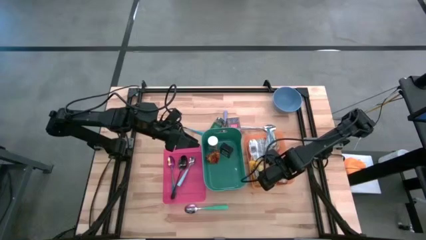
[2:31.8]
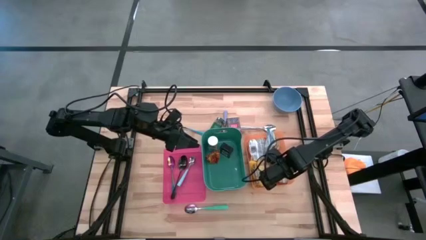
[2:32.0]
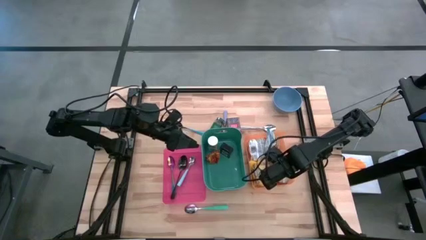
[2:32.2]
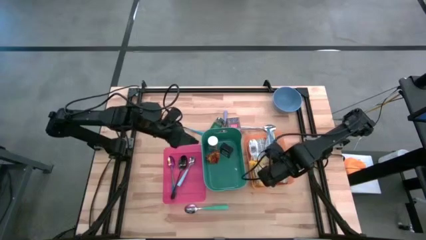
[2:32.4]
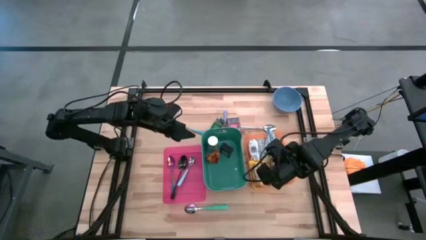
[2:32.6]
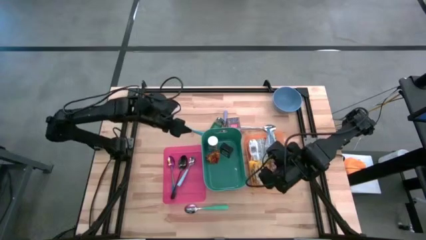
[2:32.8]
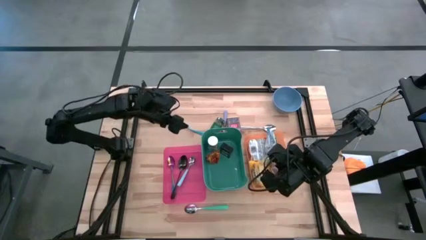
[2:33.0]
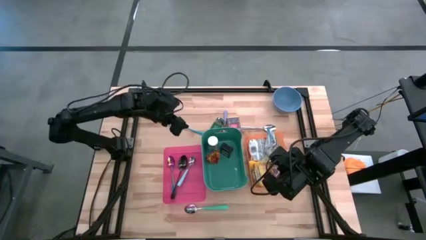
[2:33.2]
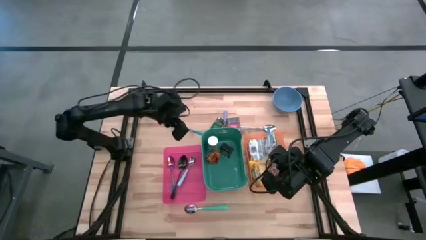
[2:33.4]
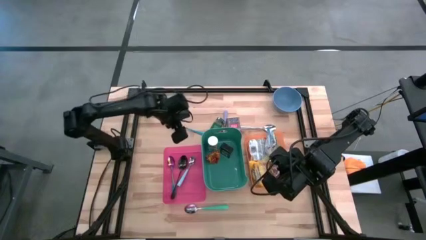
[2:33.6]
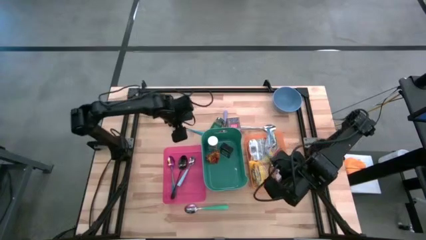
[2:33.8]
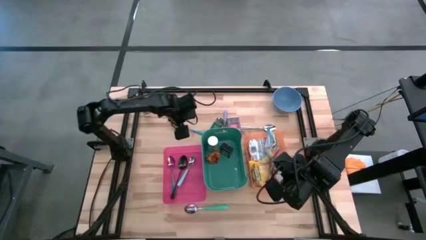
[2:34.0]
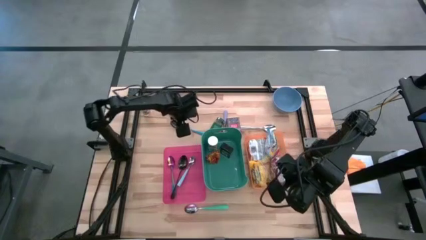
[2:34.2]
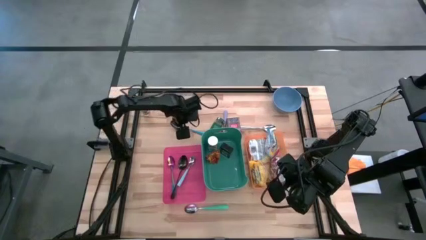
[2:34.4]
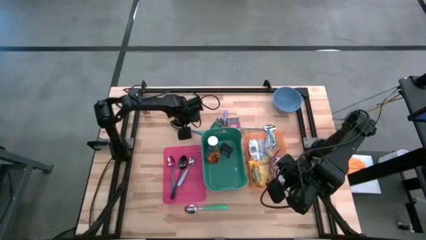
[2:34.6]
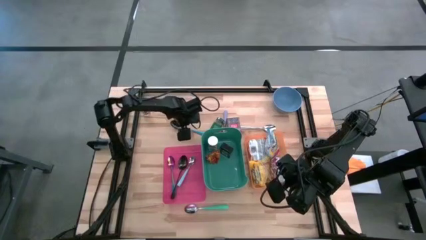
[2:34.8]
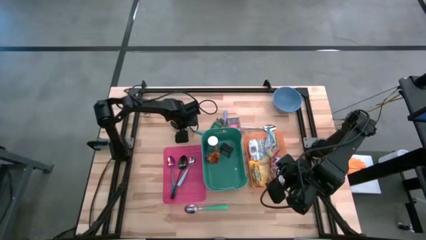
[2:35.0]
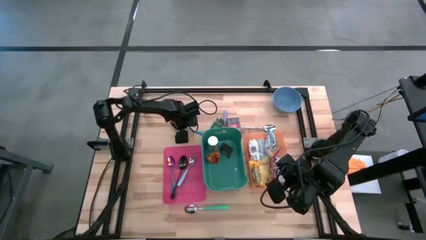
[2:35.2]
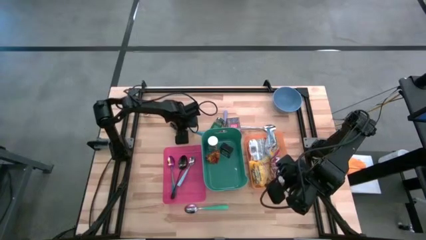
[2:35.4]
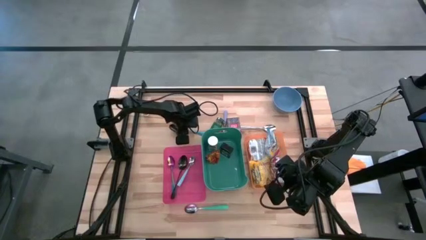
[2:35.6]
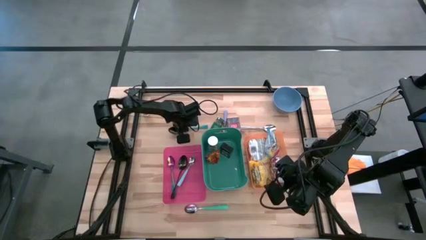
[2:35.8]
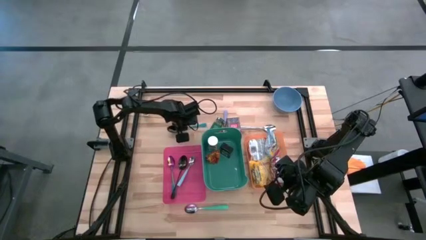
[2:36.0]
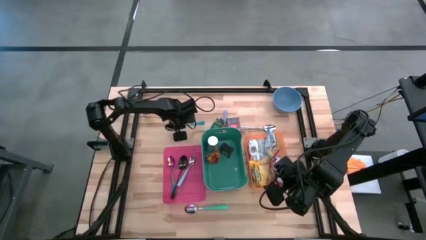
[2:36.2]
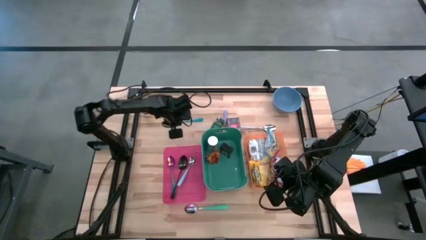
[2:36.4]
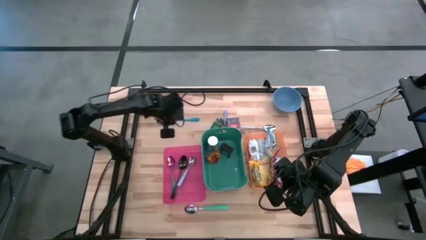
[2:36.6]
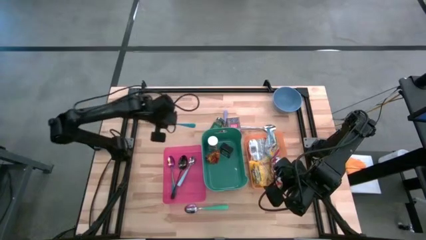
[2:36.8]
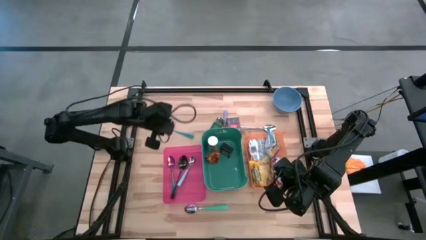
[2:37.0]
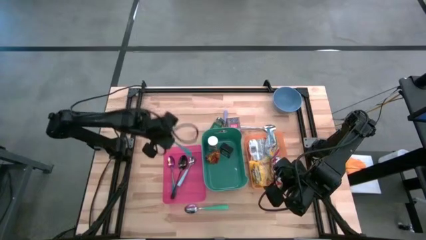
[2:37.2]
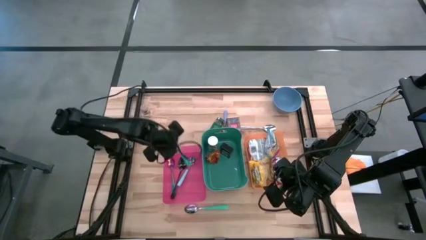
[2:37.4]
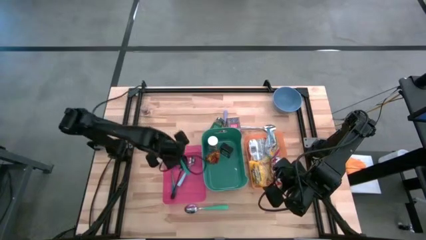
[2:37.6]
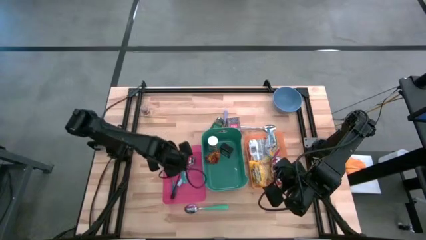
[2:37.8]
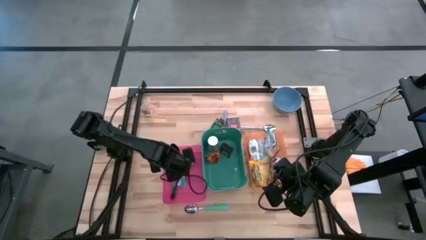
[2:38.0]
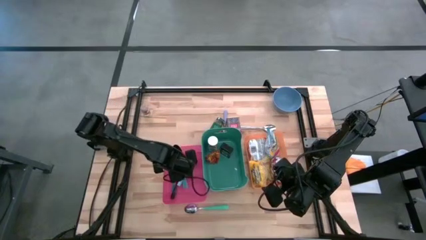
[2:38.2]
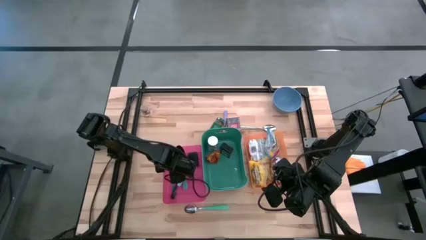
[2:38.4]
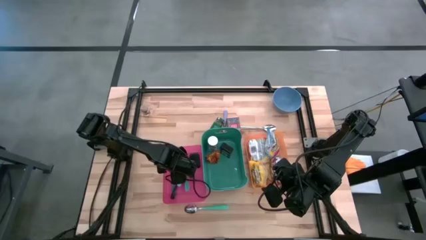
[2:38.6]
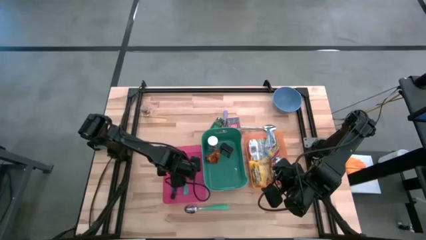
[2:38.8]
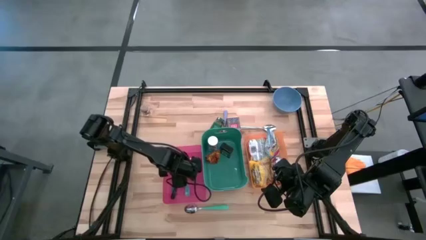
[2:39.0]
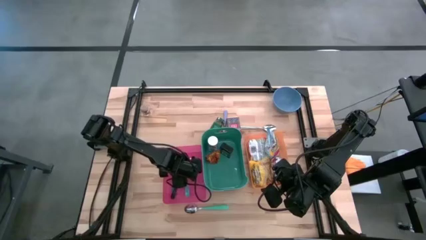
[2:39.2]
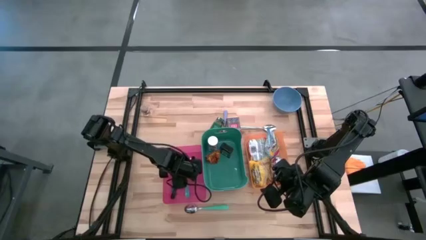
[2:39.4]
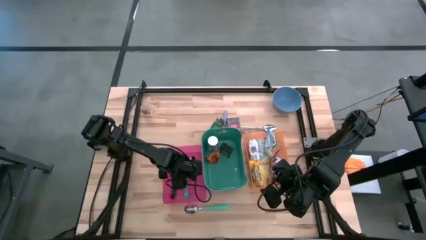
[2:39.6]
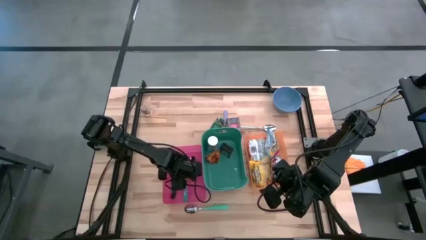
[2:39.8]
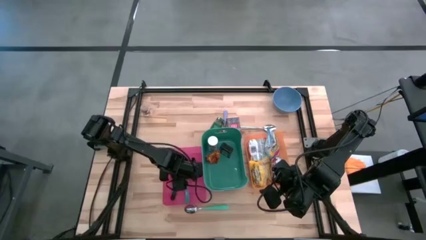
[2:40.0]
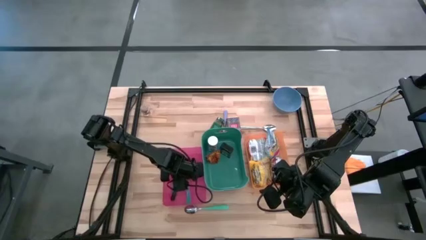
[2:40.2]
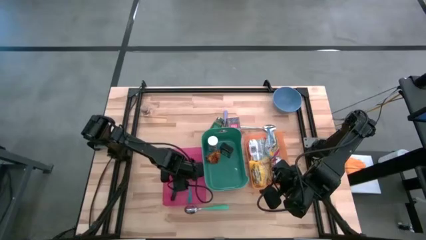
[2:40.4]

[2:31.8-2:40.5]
Put the blue and black spoon into the pink bin
